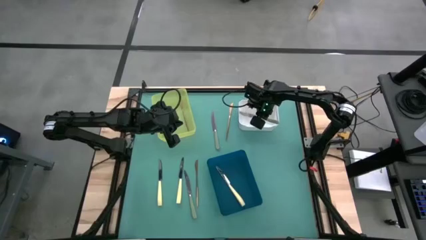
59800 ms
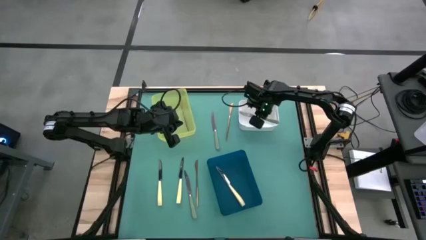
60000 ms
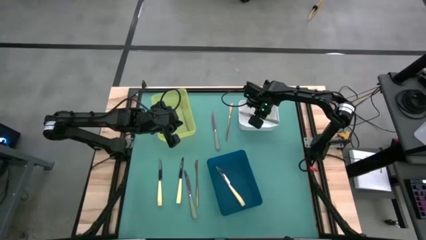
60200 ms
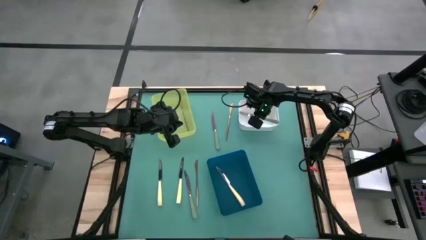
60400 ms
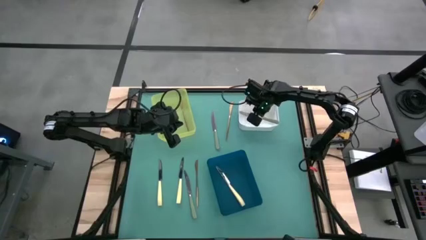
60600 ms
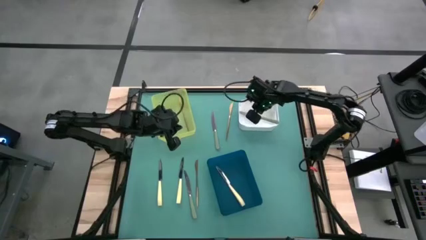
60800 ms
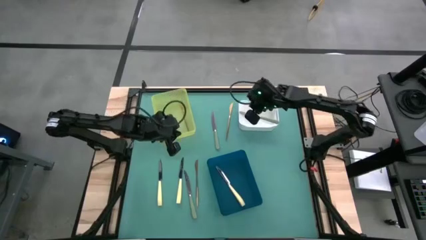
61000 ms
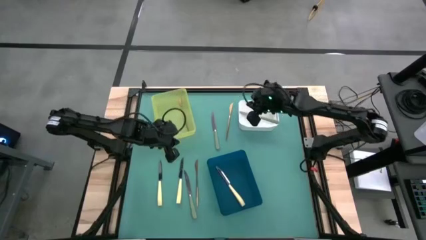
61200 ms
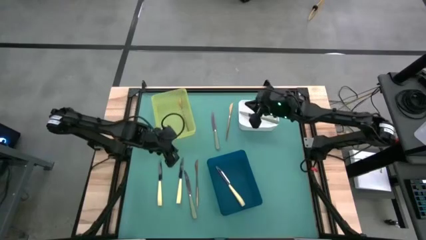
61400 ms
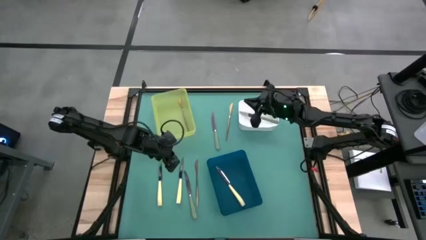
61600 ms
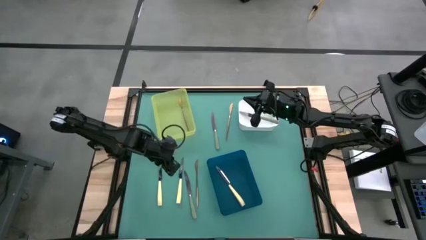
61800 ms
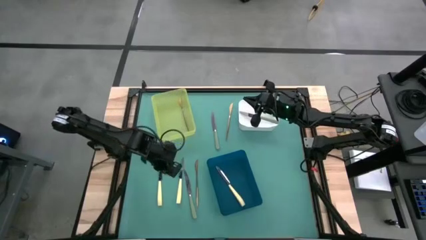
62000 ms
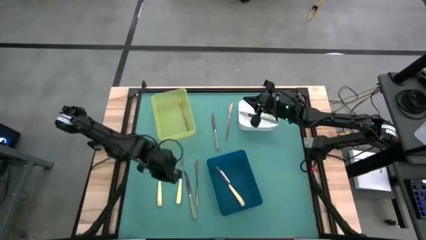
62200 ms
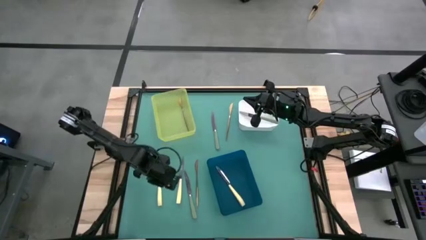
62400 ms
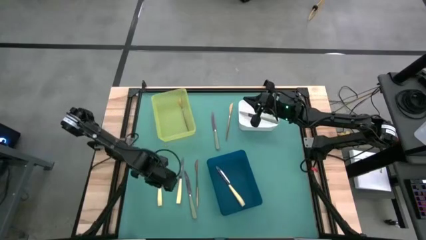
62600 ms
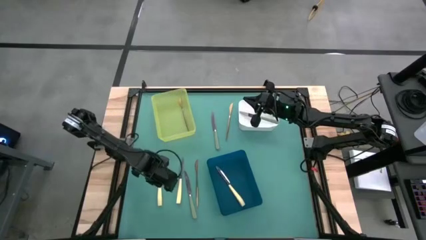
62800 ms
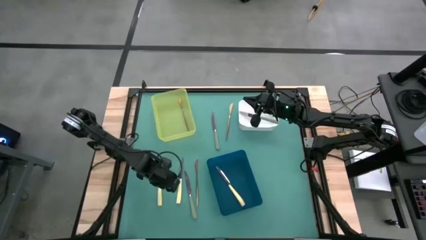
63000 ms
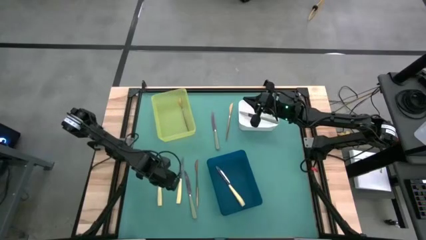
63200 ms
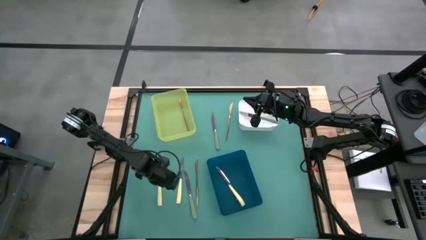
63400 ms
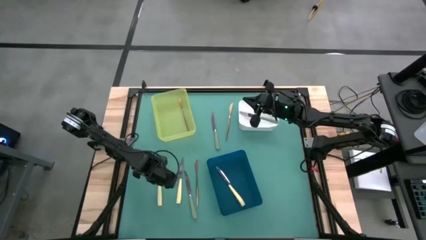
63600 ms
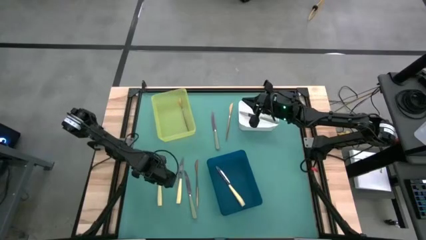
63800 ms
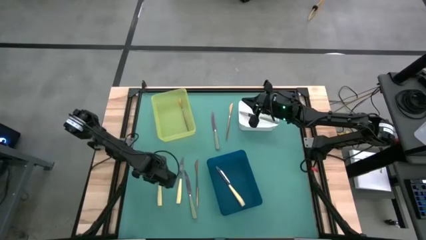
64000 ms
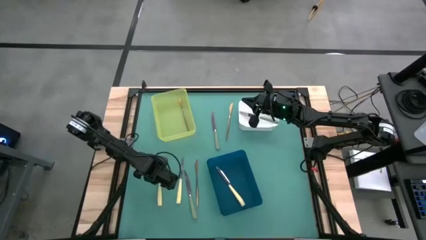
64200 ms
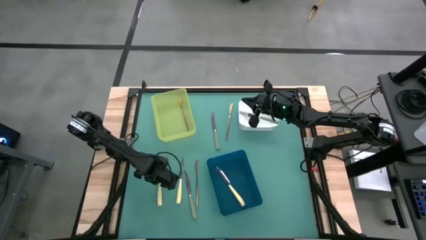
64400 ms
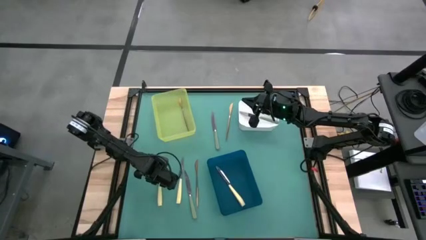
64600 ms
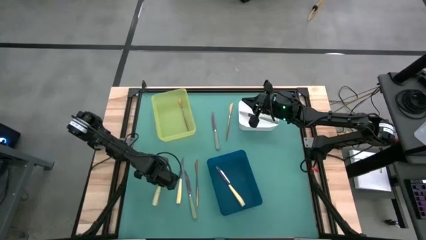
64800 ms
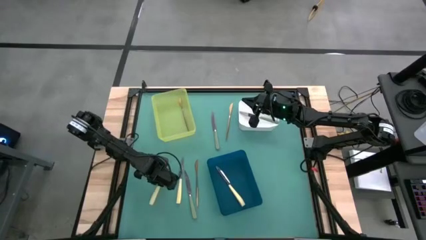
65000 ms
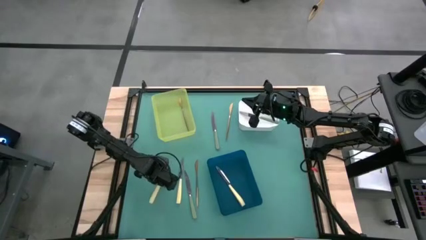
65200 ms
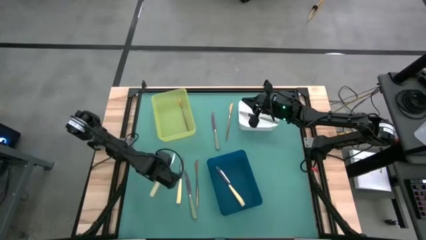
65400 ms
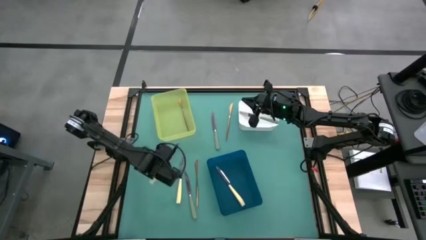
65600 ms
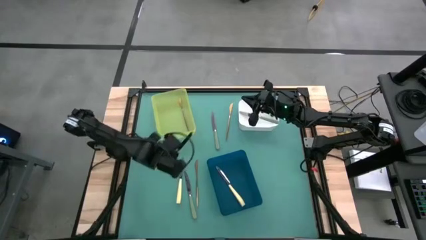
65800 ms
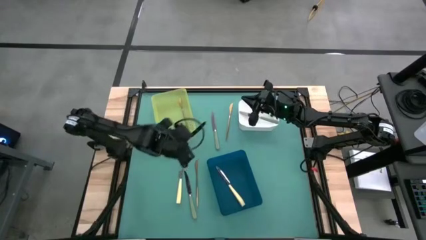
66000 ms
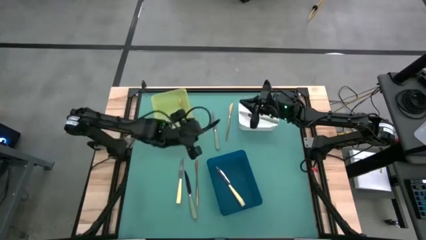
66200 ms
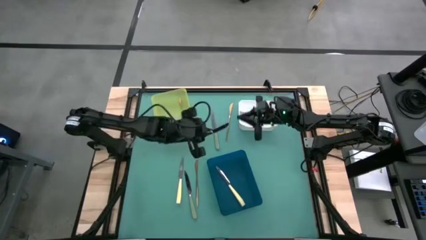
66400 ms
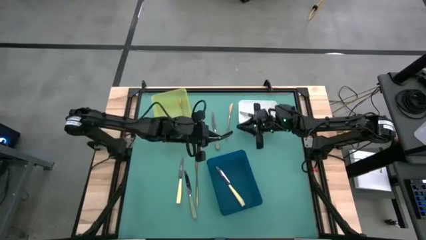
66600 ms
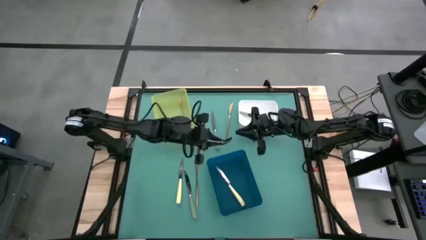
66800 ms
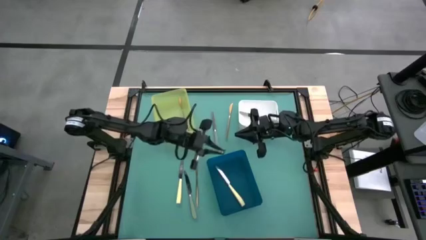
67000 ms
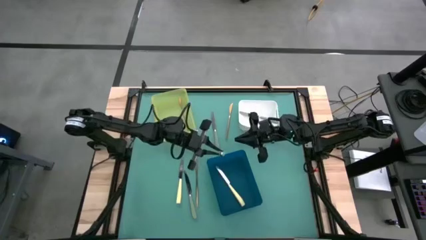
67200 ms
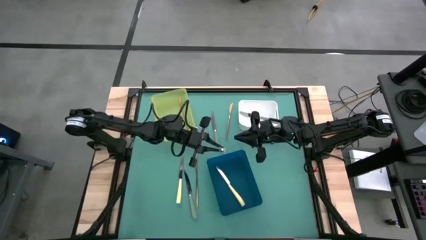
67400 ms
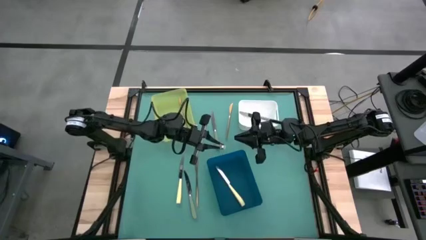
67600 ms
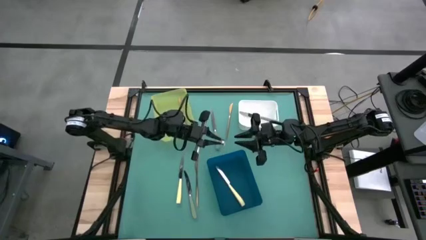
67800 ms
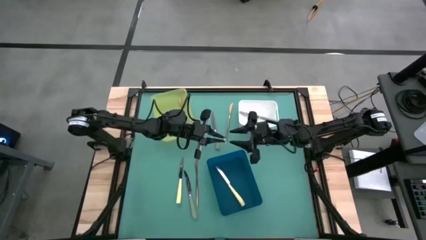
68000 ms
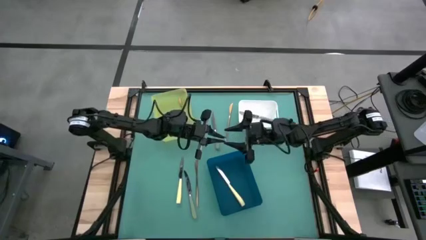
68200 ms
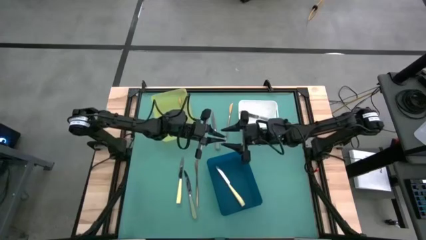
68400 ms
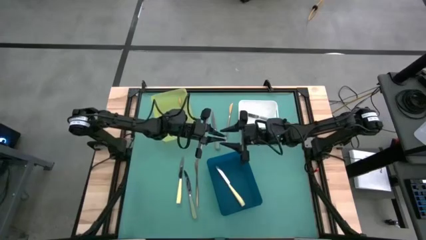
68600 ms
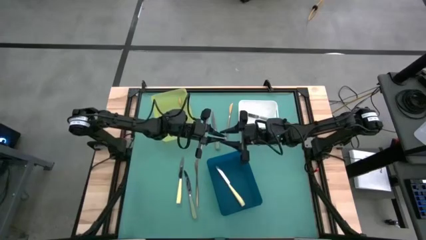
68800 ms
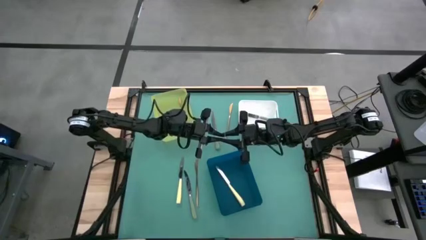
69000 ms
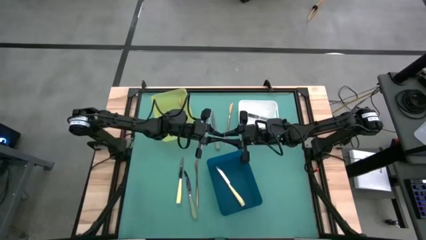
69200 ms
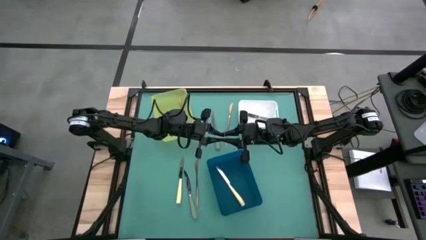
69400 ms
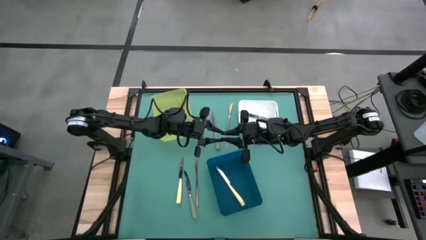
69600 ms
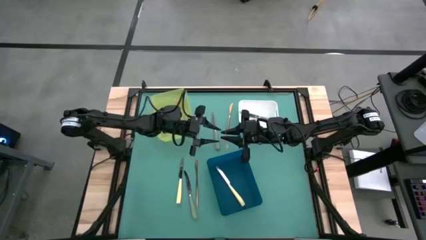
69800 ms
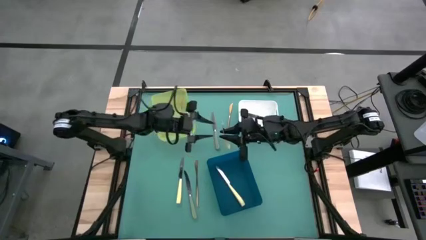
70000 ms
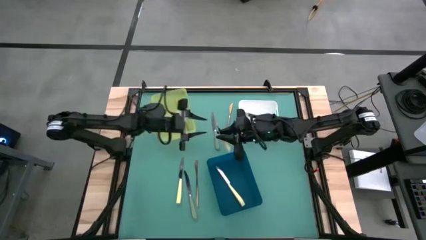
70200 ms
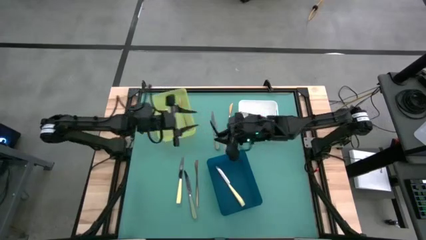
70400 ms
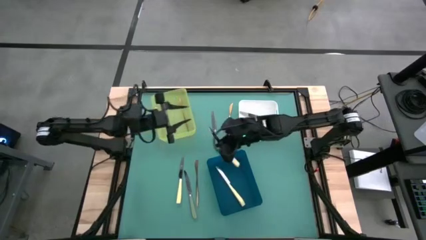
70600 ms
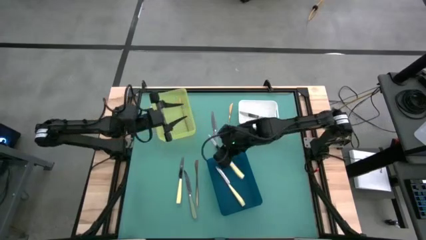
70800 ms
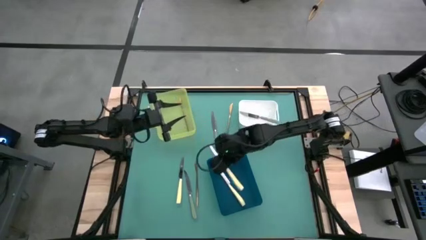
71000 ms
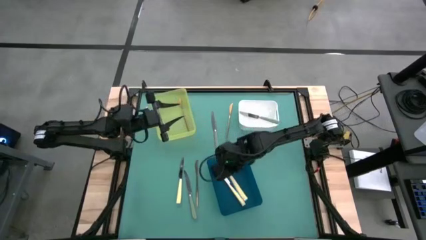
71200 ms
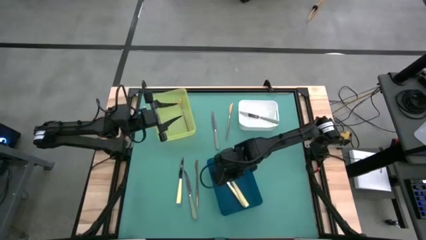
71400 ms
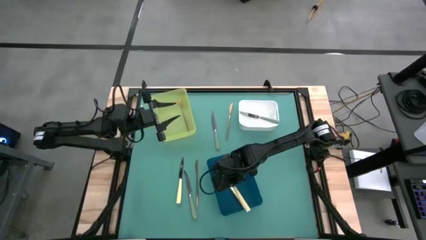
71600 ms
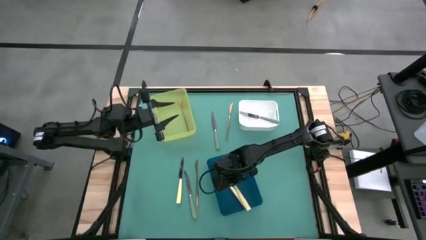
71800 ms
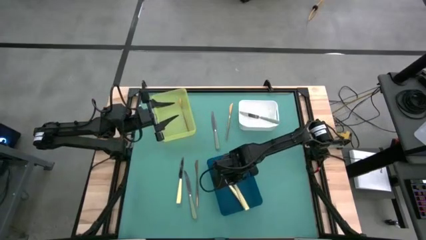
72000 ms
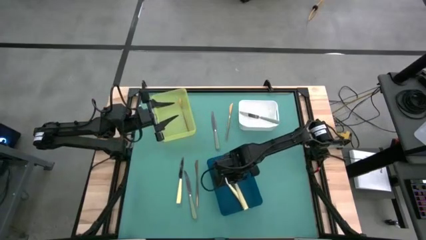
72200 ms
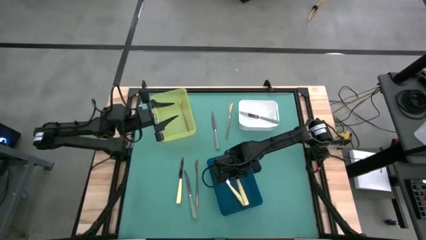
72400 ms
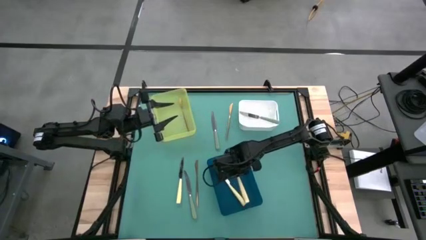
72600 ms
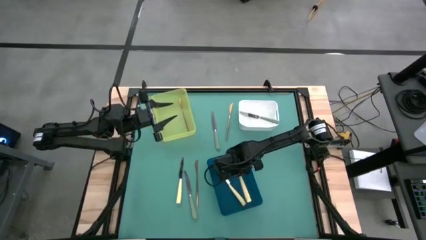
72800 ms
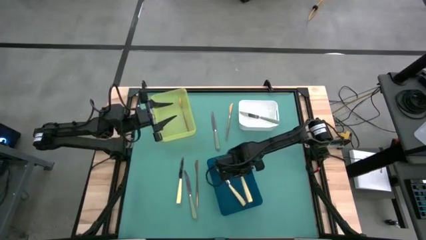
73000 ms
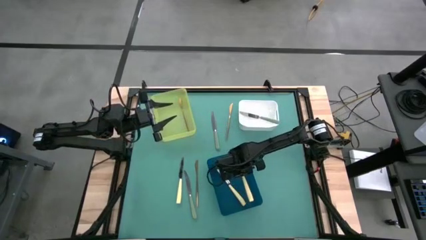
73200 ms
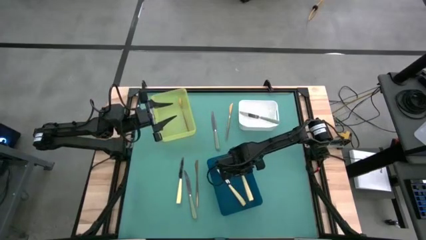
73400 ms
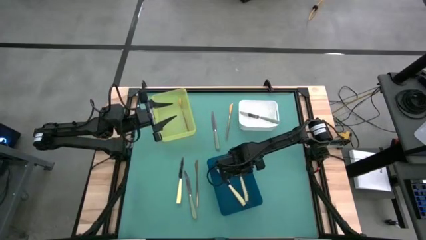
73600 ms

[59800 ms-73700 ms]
Task: Sort silverware by color (type)
Put the left yellow knife into the blue bin
